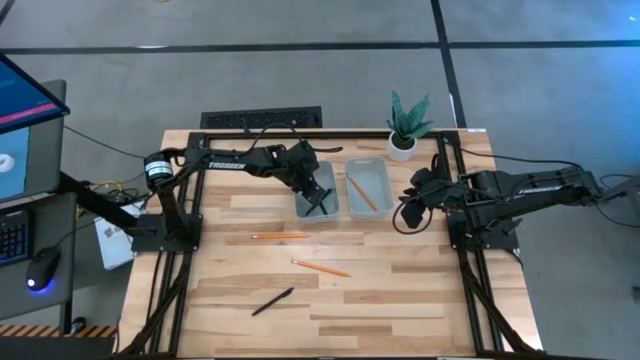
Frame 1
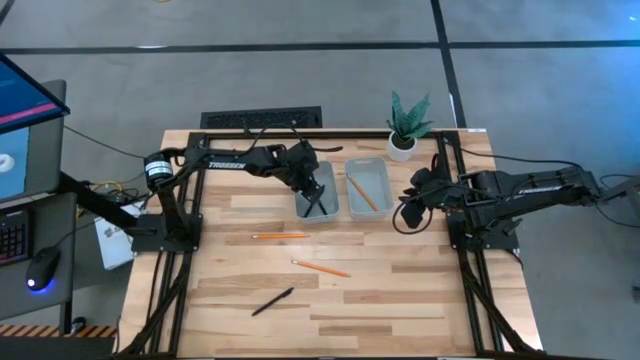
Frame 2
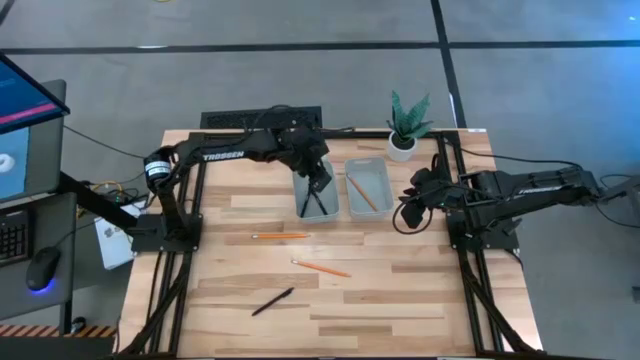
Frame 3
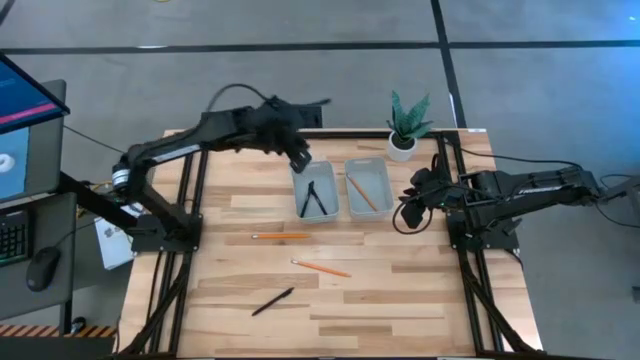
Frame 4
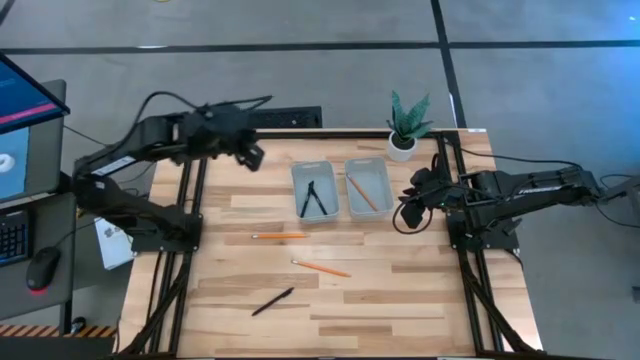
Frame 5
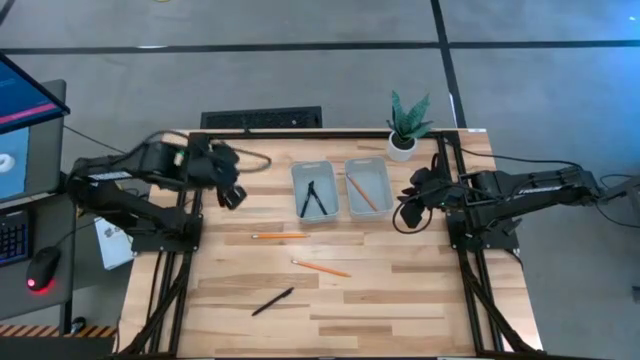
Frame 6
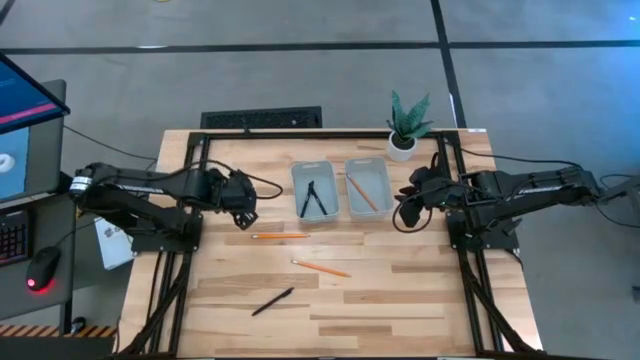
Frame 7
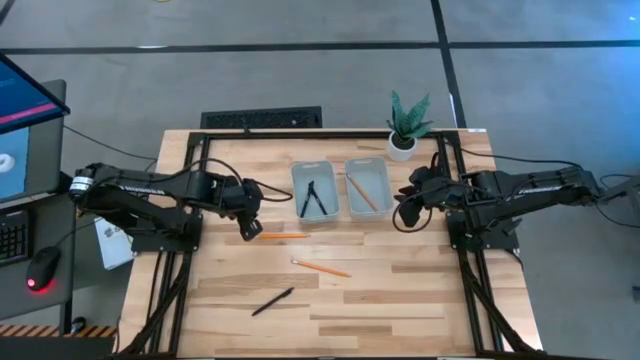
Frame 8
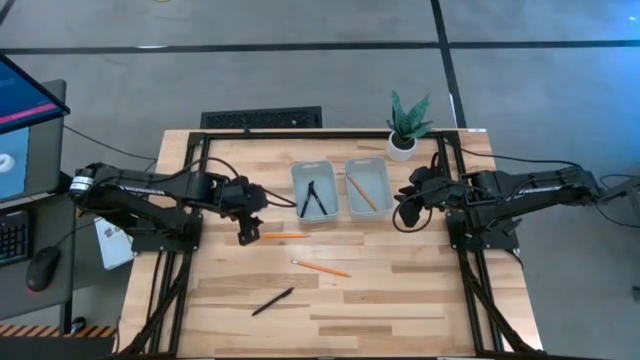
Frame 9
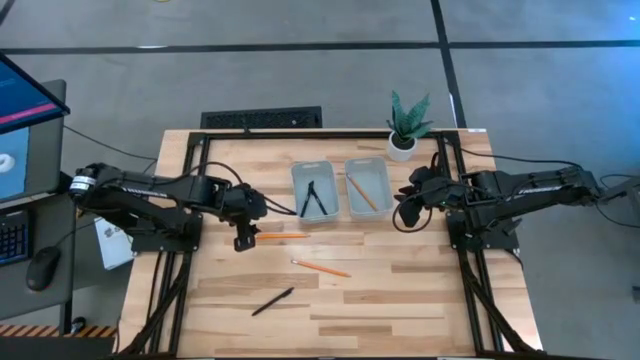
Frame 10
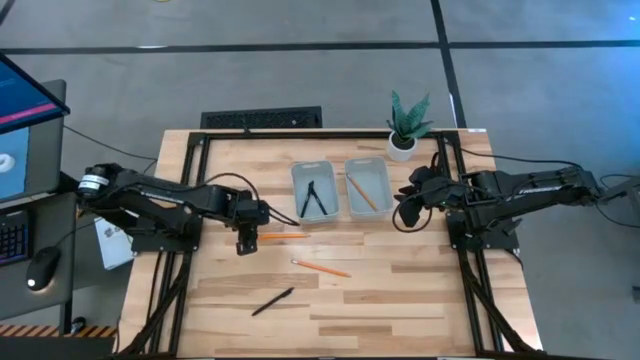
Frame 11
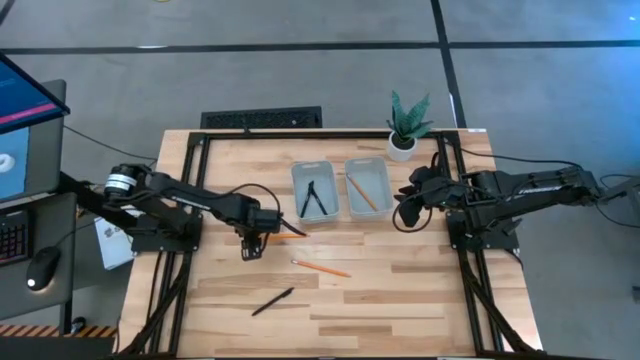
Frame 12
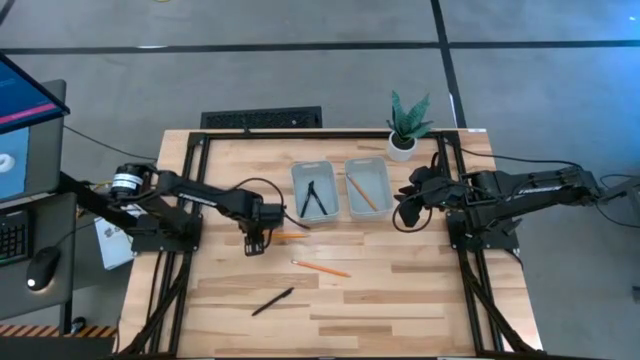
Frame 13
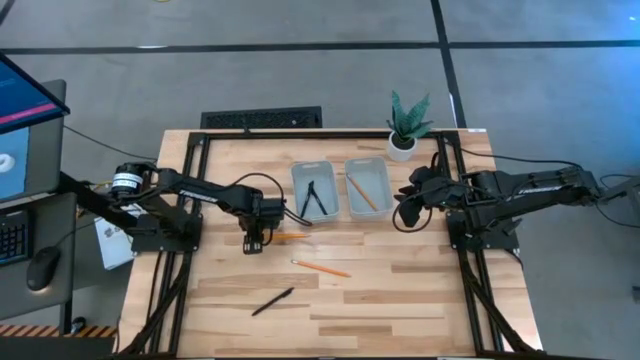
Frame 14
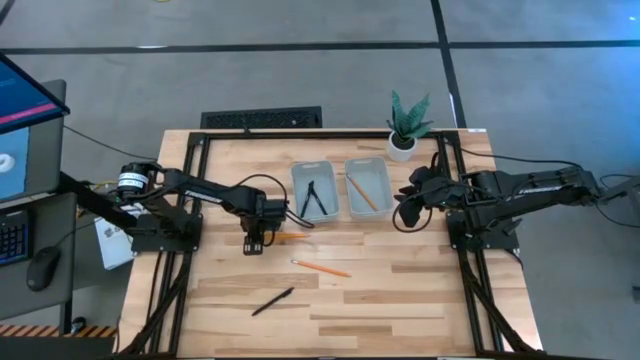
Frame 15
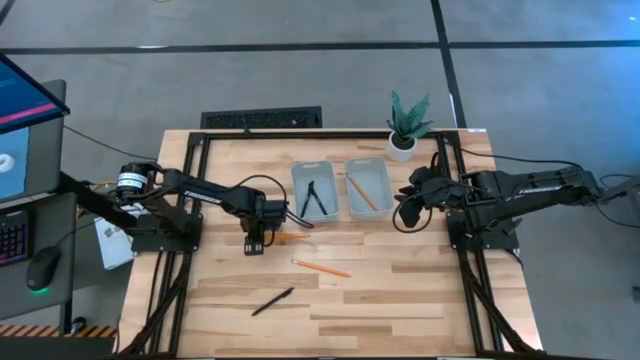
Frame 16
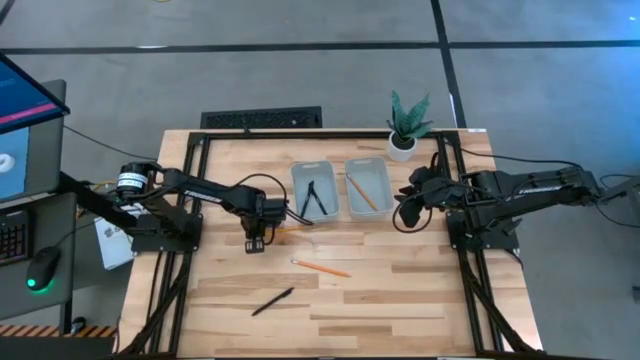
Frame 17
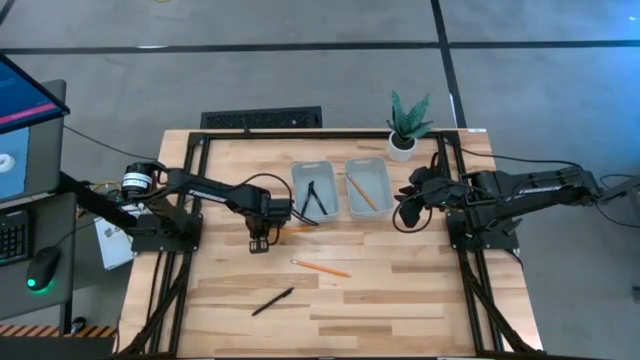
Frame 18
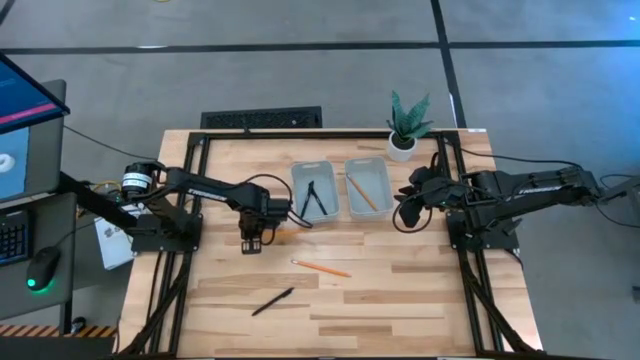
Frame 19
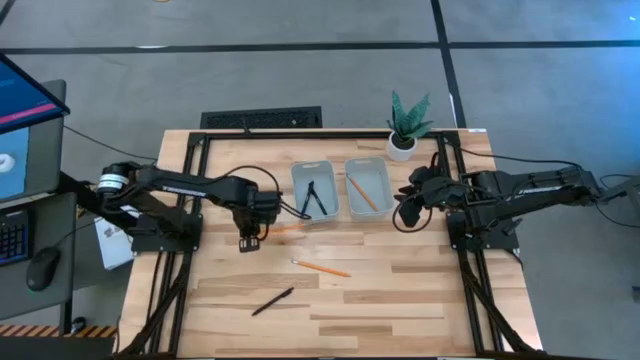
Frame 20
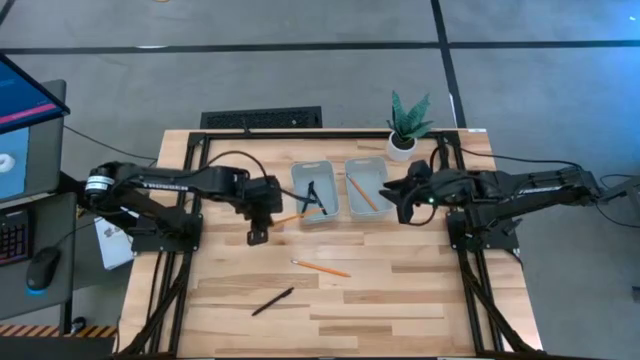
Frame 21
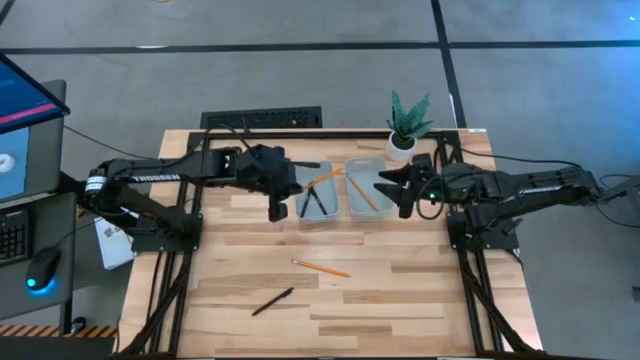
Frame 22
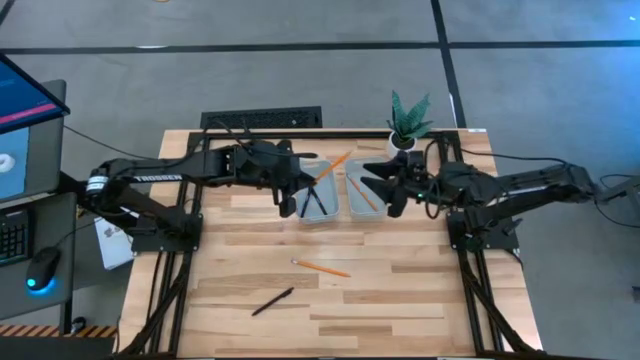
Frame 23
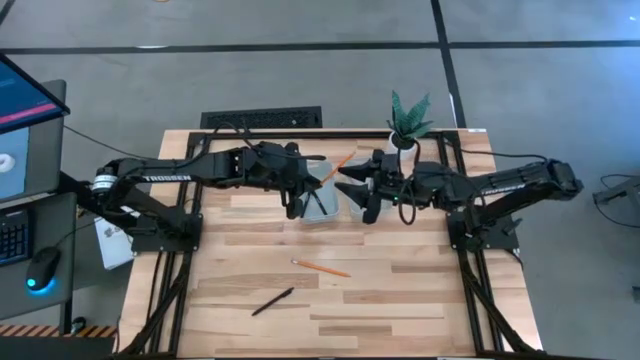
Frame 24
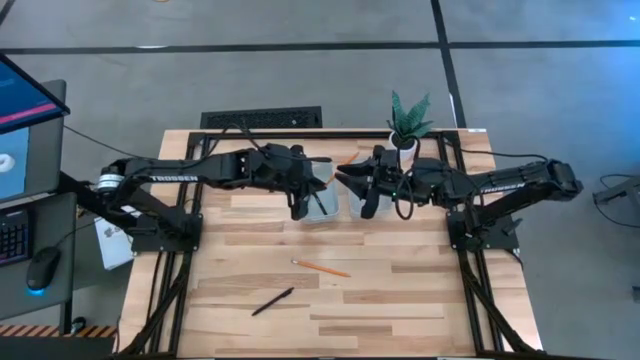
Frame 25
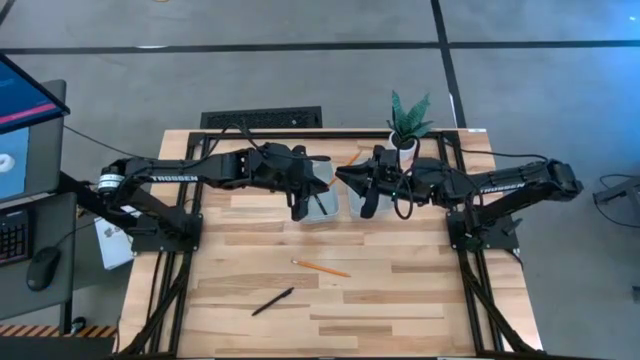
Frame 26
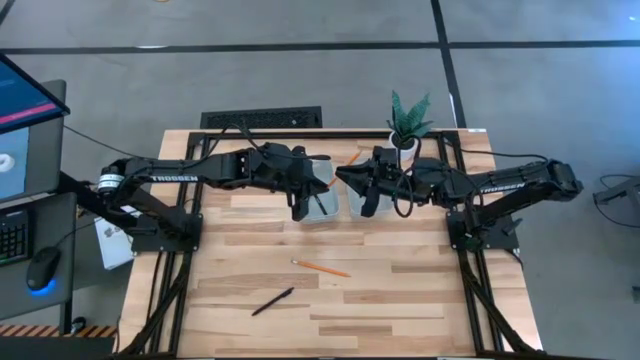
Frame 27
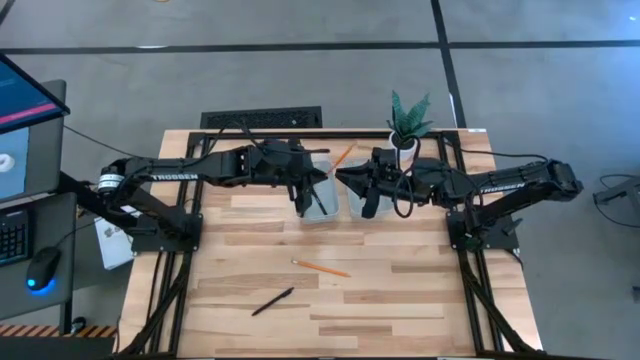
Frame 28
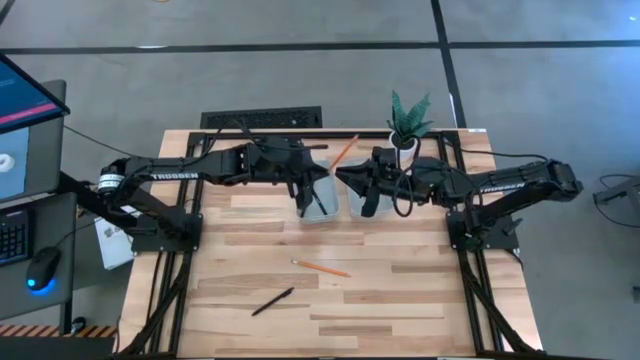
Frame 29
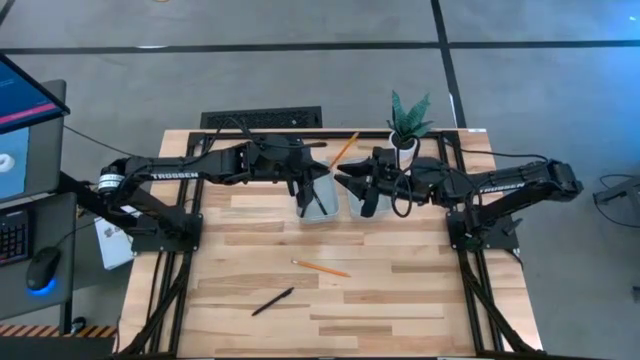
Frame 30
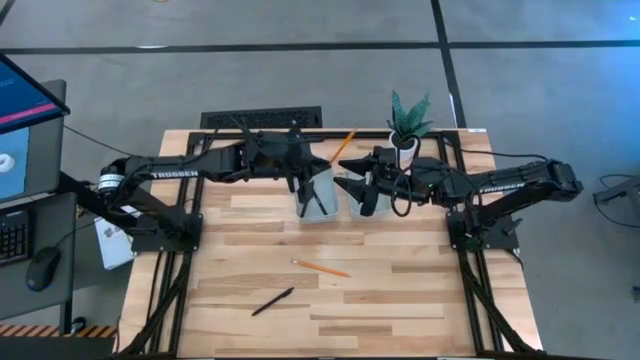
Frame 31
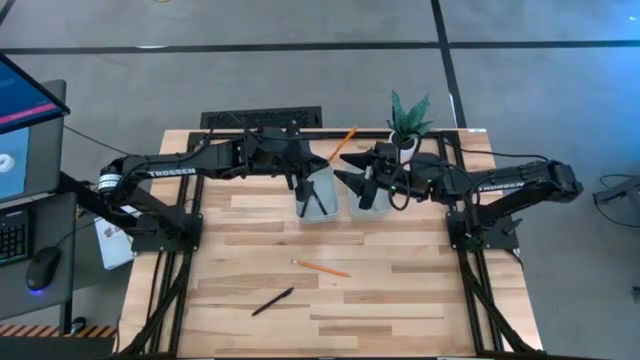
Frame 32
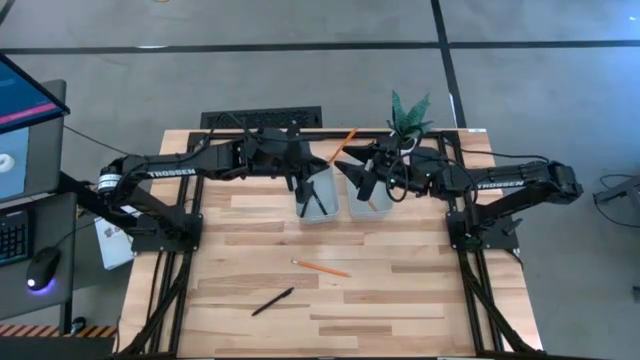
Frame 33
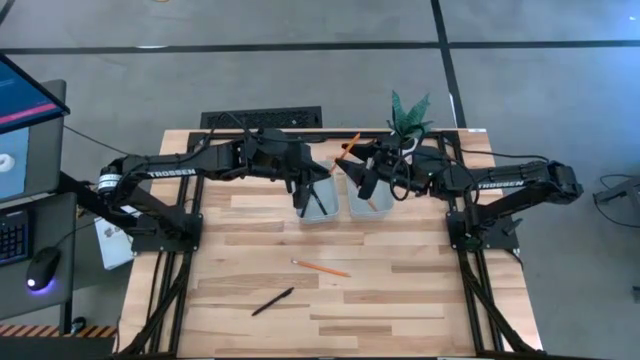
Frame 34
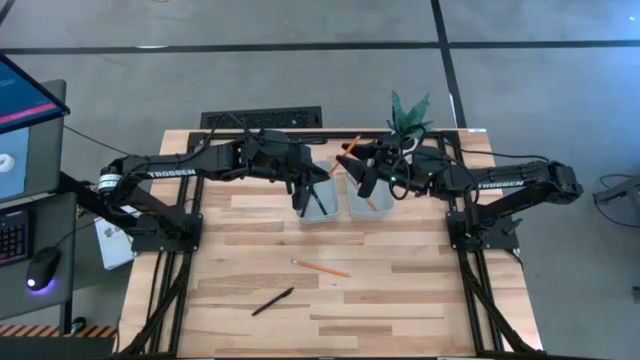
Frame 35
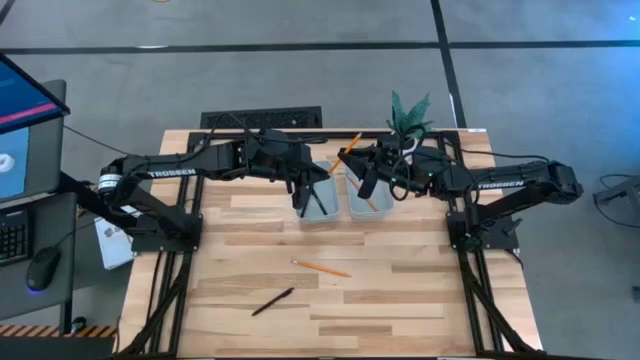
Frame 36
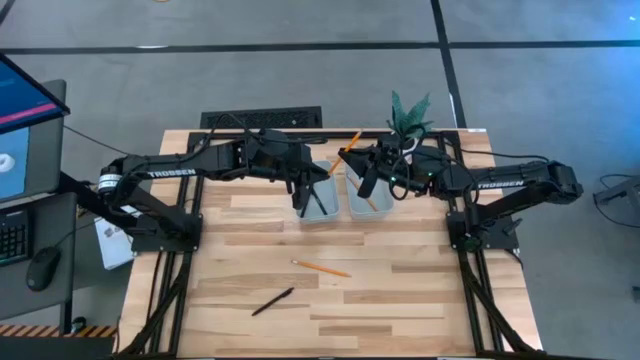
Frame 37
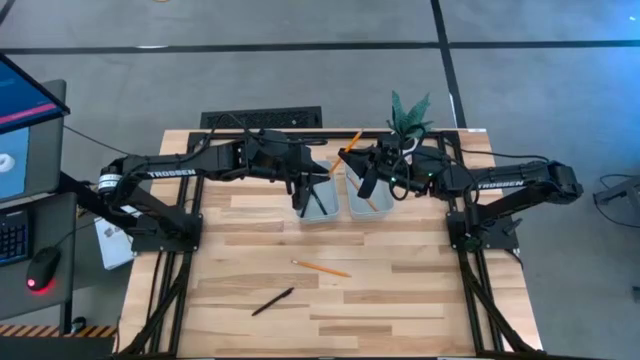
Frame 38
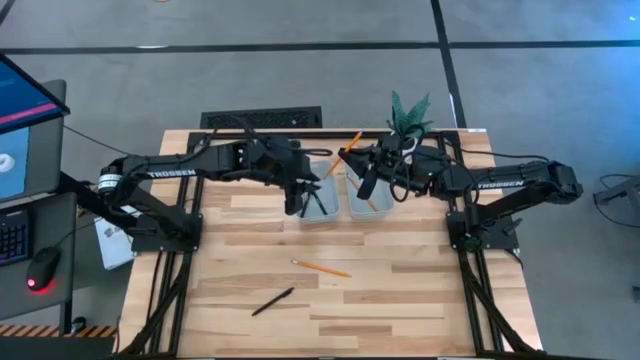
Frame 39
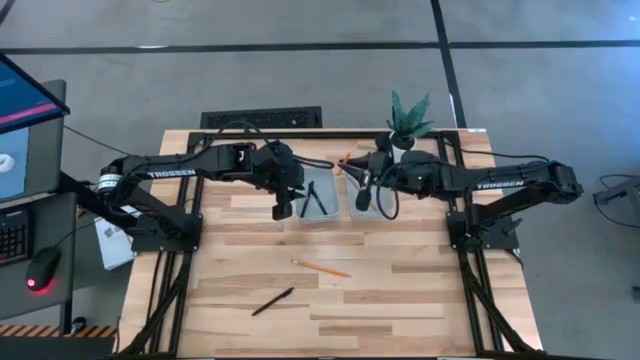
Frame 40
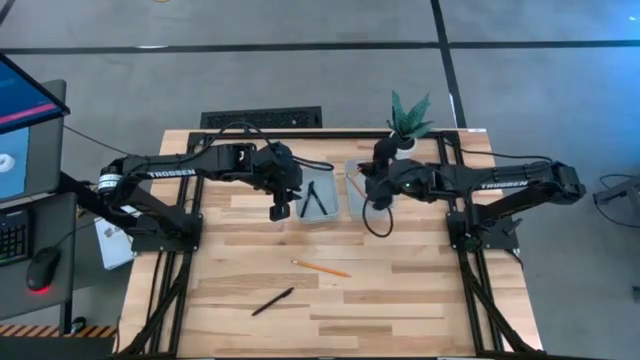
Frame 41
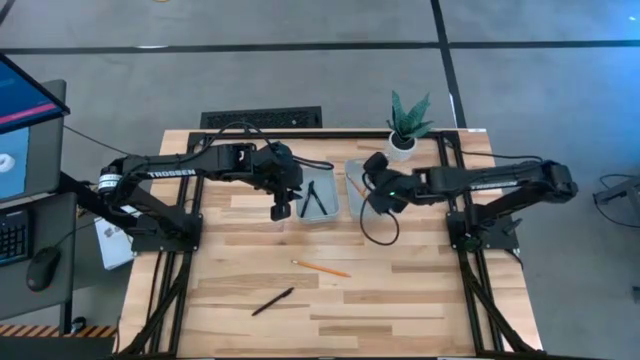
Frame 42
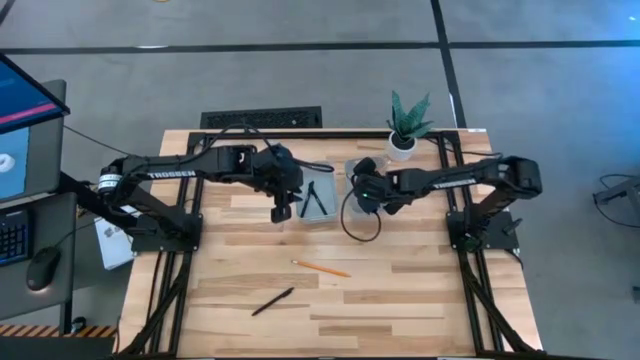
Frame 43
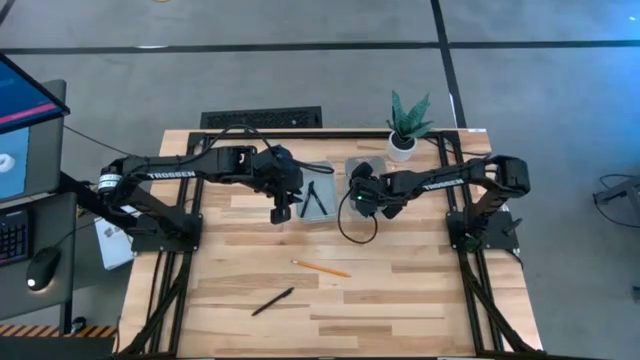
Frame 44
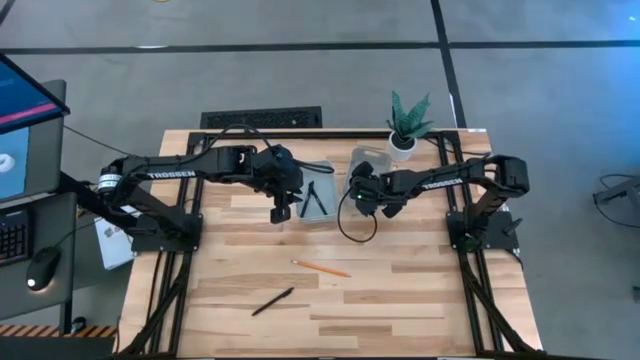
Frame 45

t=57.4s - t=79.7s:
Task: Sort pens & pencils
Put the top yellow pencil into the right gray bin
